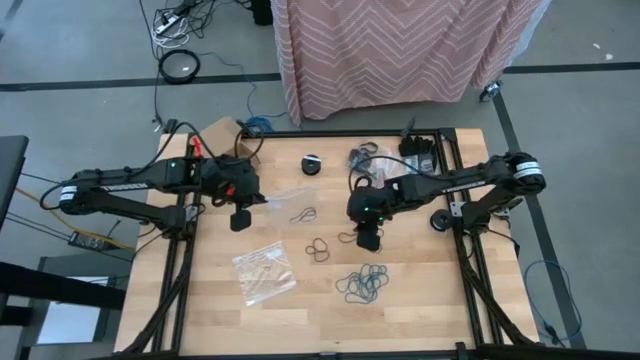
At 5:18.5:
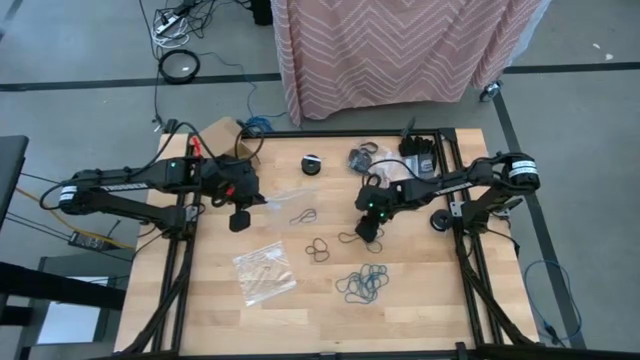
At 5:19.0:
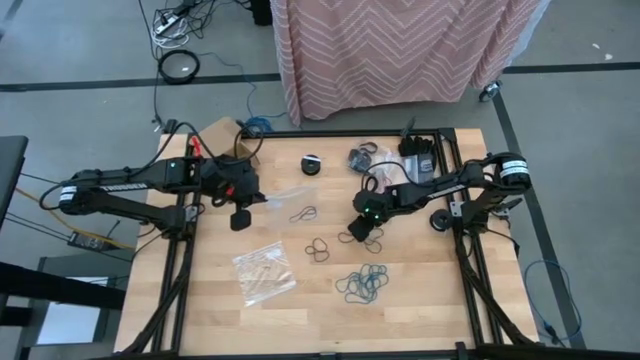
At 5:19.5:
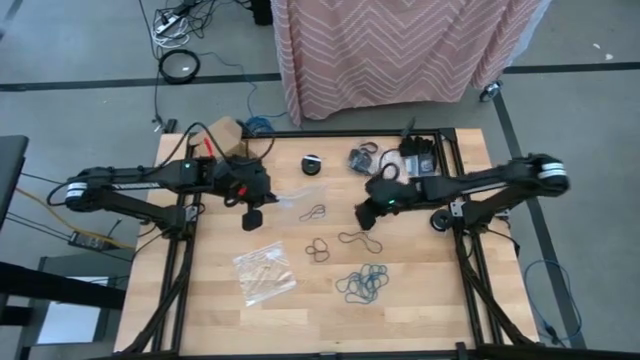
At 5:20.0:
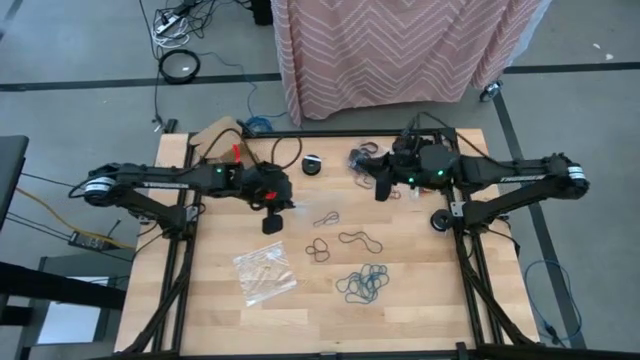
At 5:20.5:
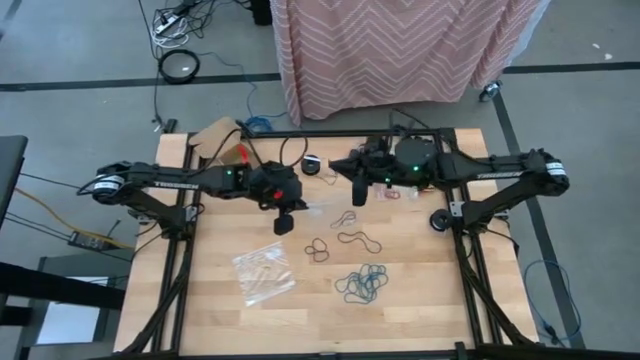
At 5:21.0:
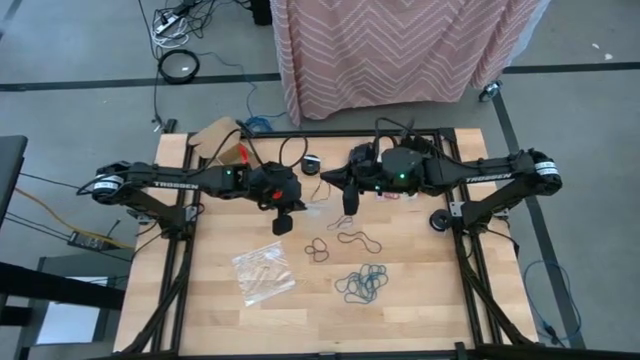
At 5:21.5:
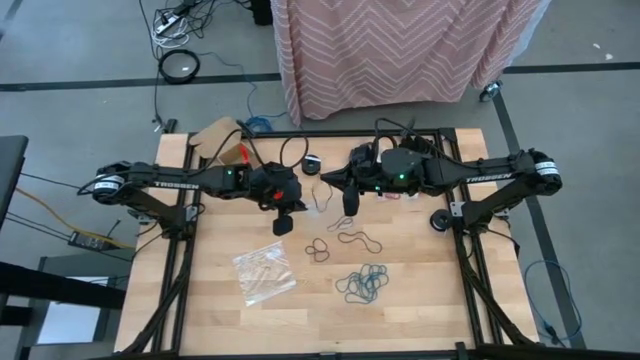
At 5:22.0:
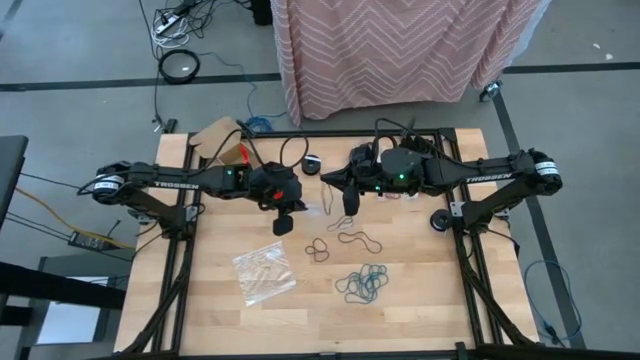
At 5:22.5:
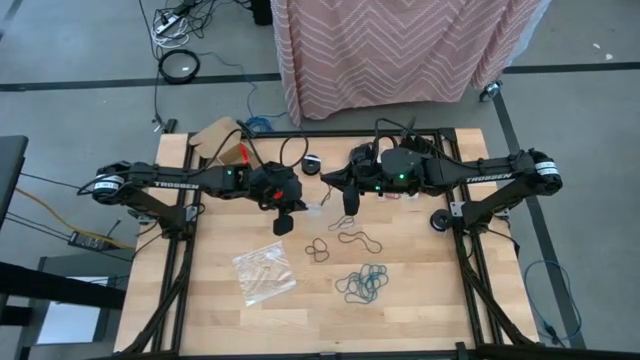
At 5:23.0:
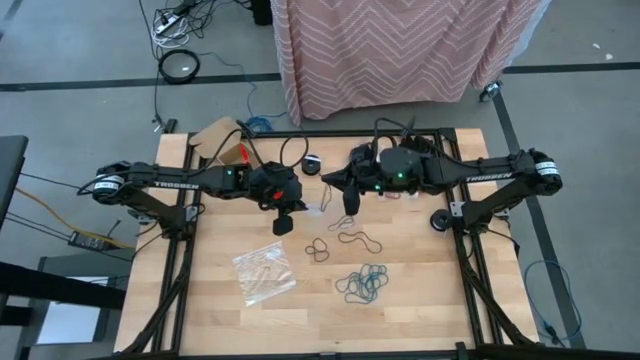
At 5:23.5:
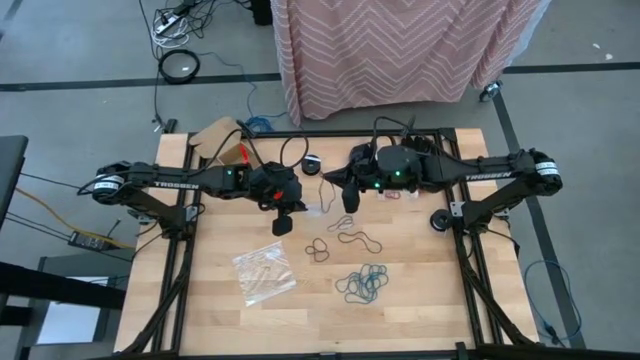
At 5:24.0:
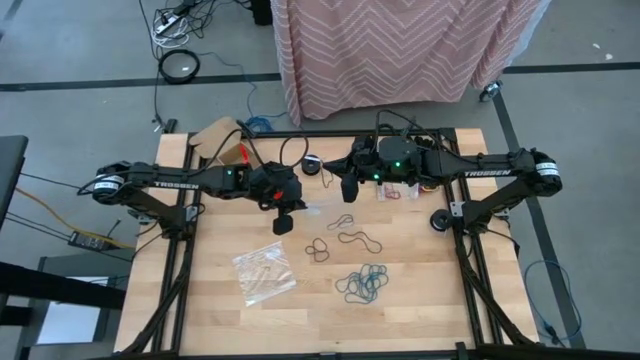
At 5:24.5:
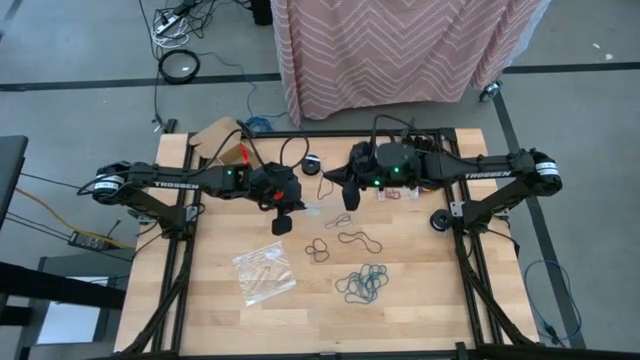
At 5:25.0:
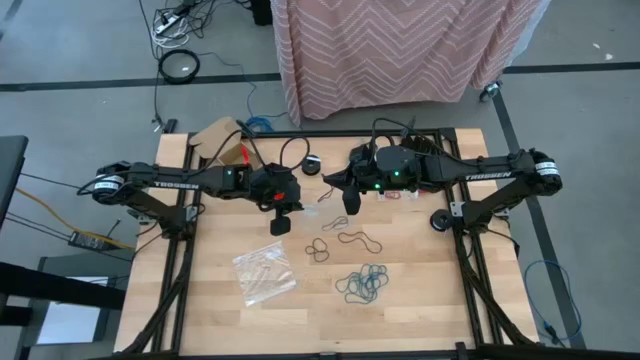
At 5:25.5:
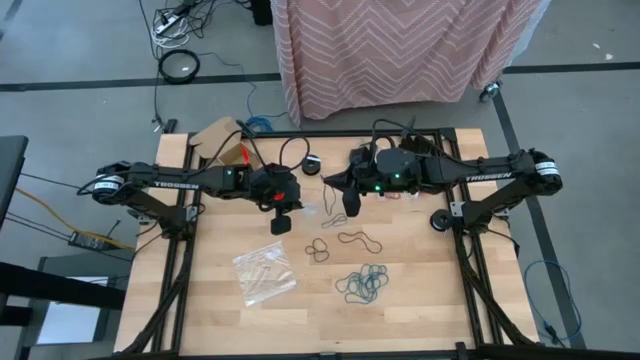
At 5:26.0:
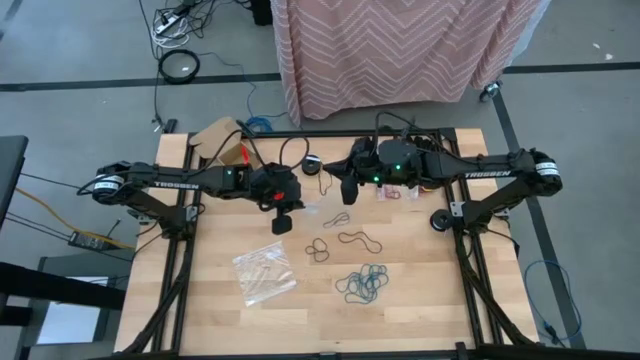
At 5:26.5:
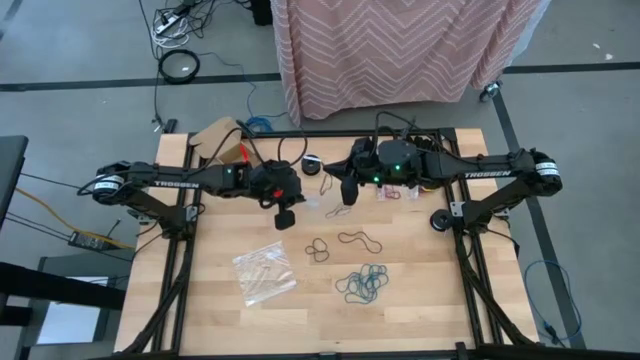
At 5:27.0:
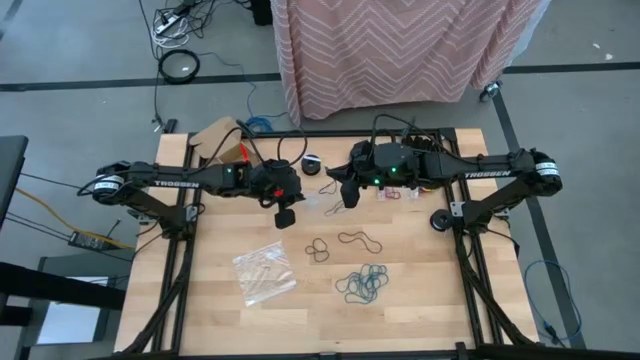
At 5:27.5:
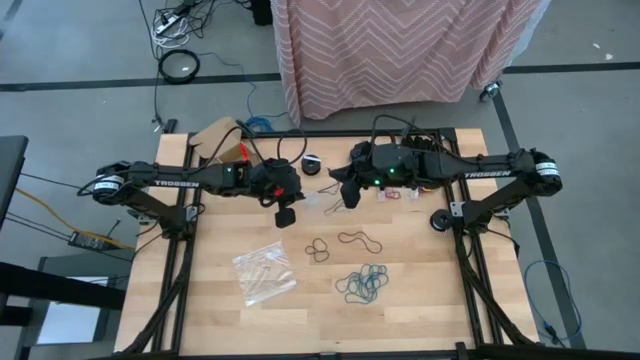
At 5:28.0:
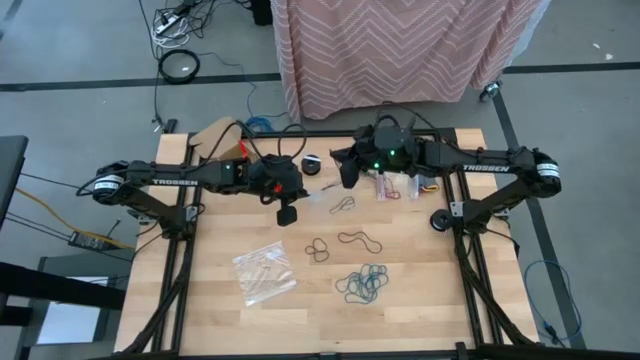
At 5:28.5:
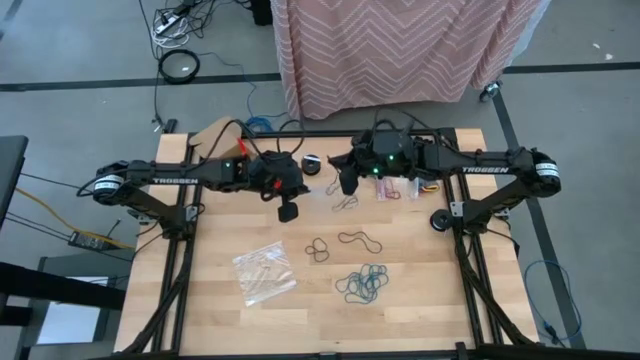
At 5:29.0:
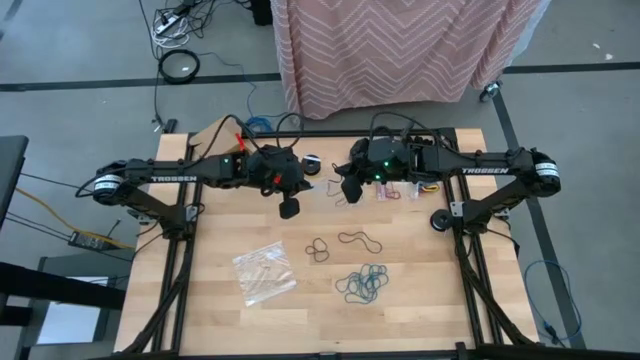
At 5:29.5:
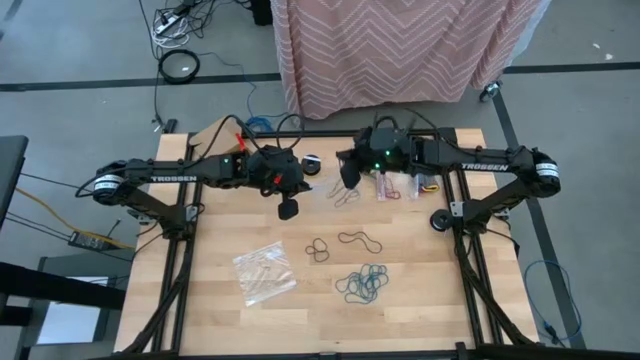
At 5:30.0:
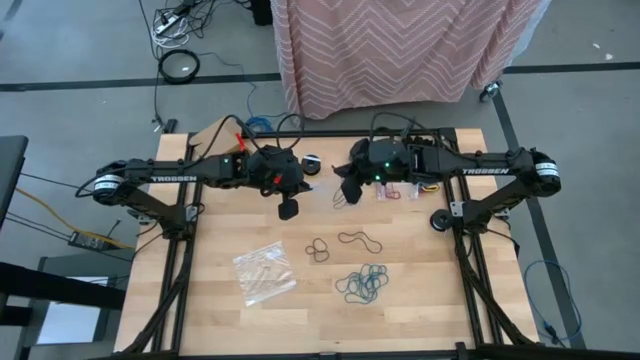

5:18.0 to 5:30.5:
Task: Sort rubber bands
Put the violet rubber band into the transparent bag

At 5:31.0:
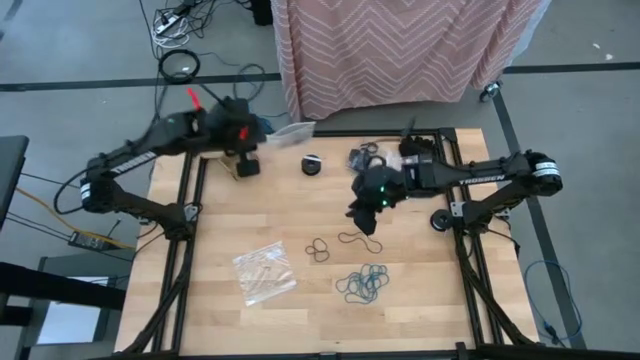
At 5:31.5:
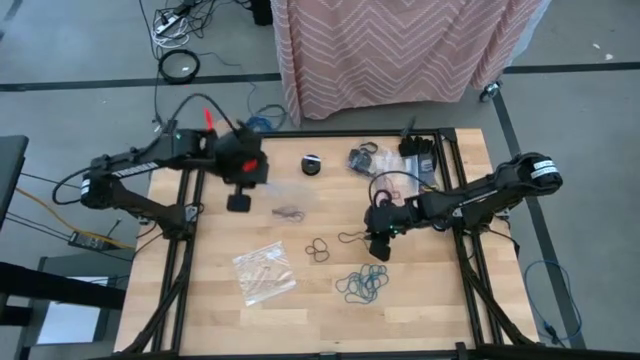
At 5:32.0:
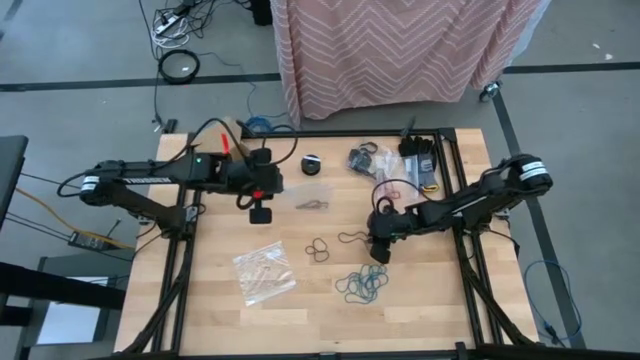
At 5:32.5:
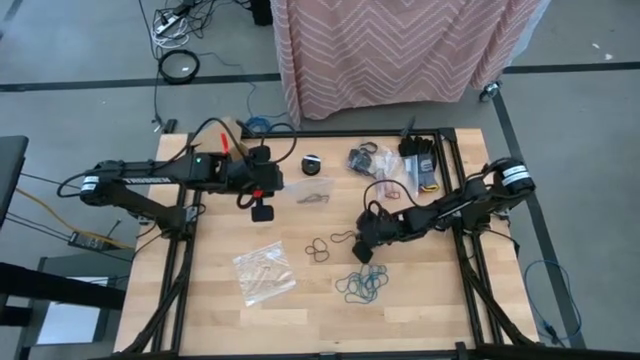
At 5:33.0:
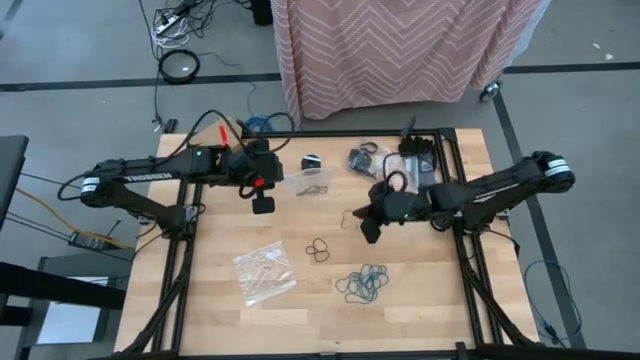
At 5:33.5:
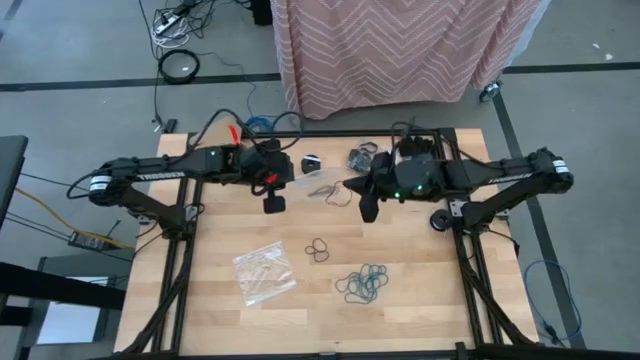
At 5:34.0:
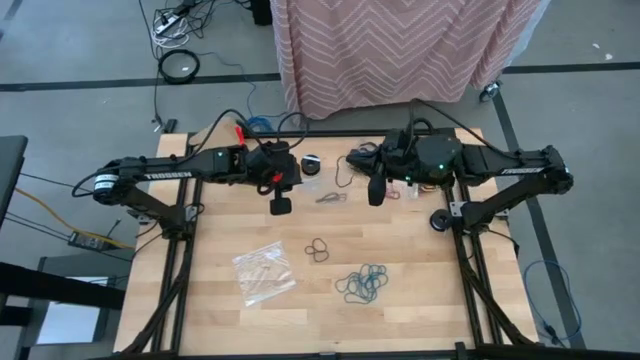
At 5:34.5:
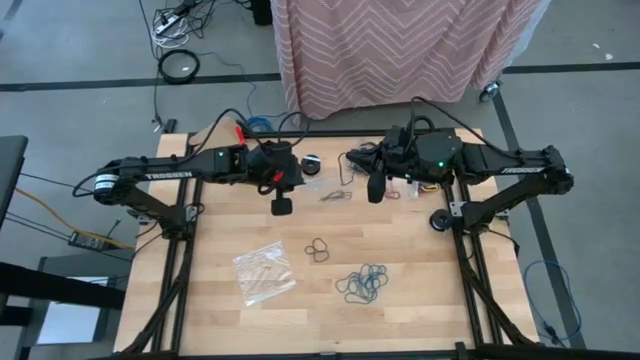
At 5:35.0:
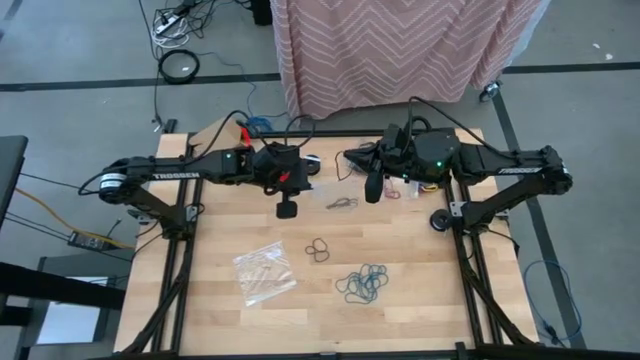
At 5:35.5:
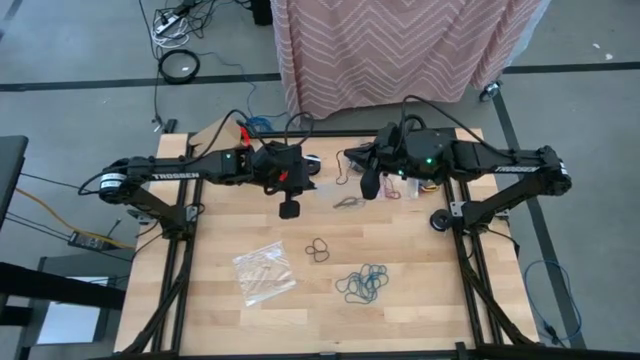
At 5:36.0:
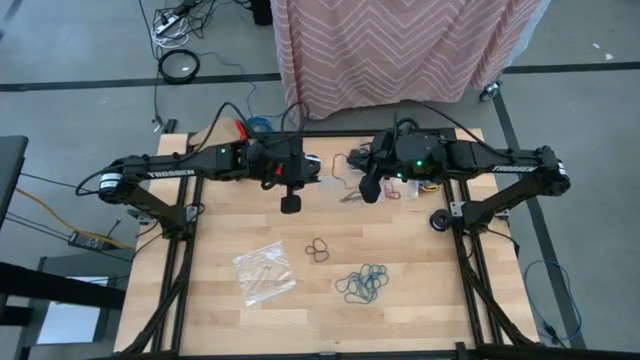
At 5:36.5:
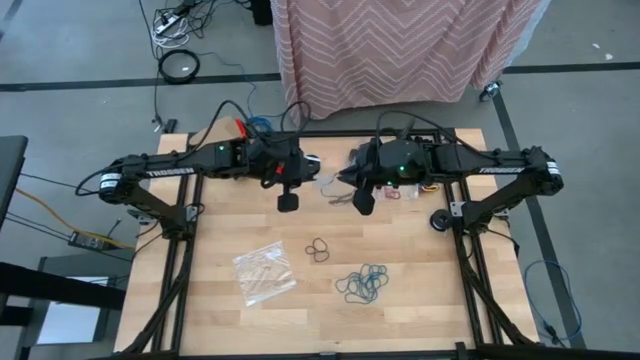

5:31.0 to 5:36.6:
Put the violet rubber band into the transparent bag

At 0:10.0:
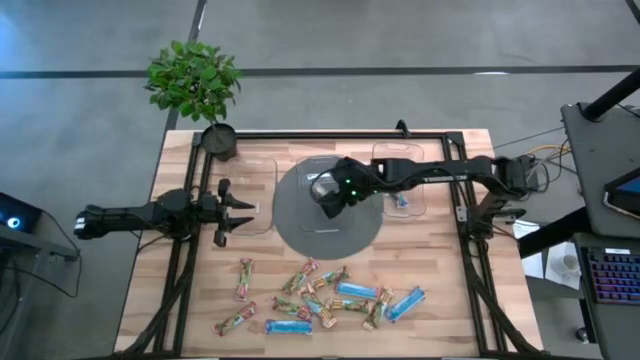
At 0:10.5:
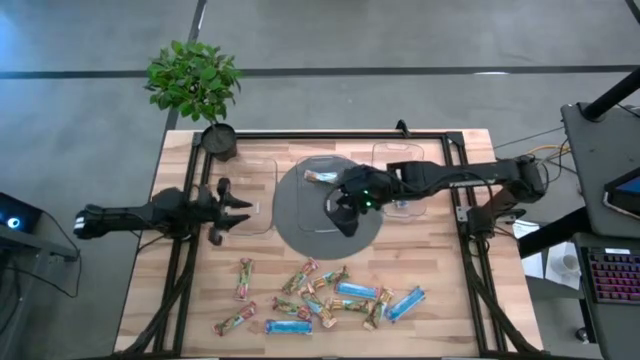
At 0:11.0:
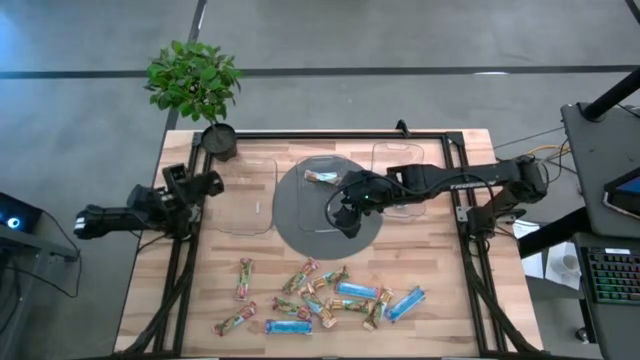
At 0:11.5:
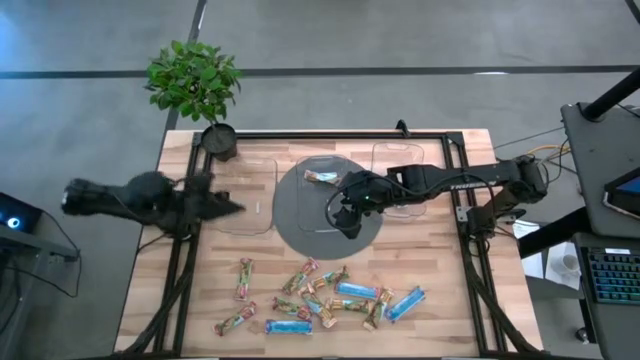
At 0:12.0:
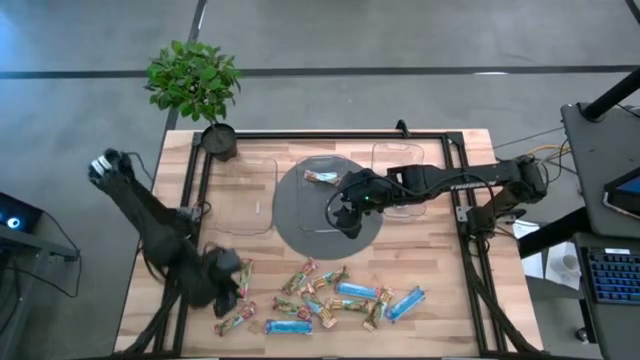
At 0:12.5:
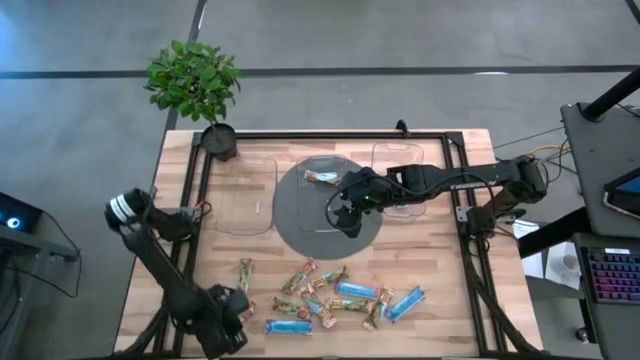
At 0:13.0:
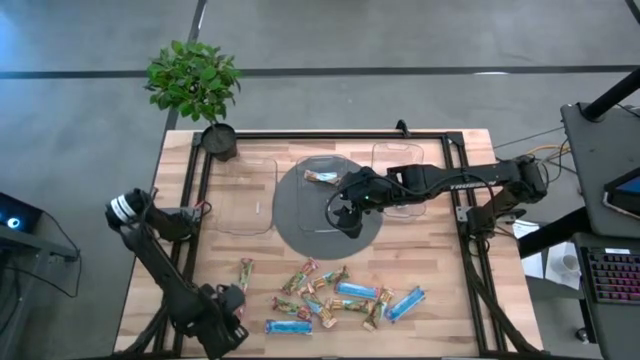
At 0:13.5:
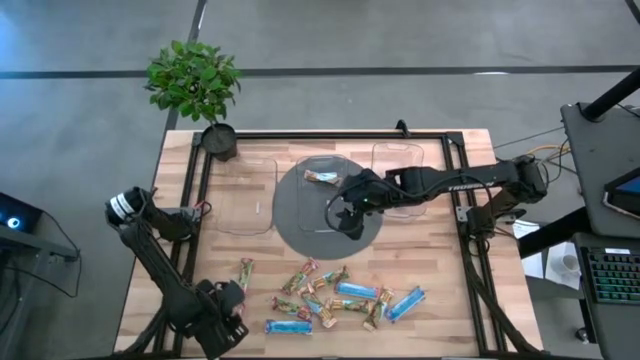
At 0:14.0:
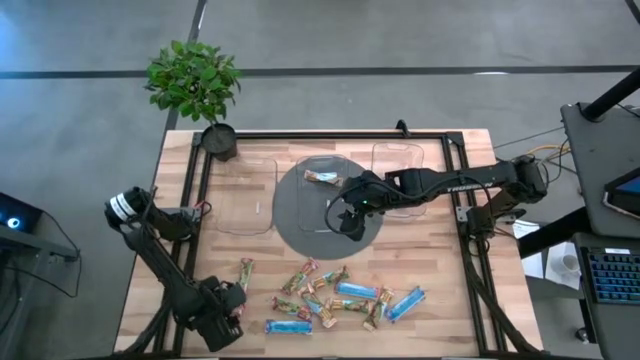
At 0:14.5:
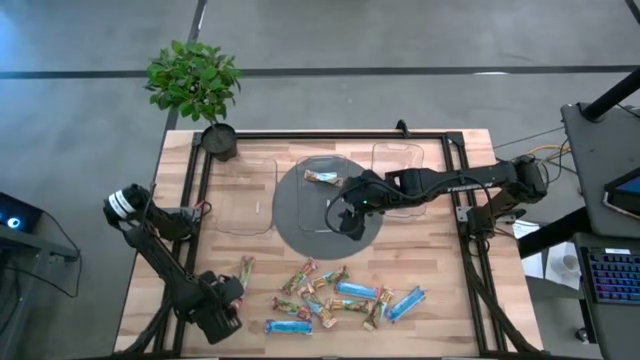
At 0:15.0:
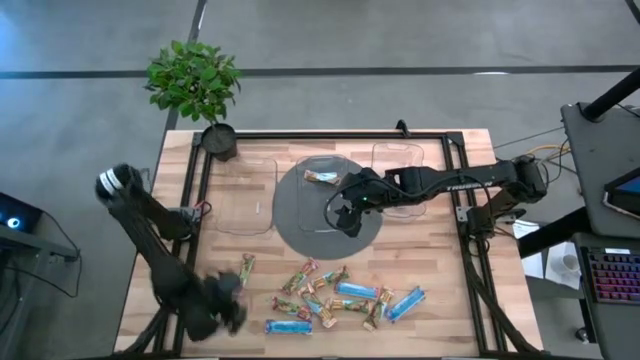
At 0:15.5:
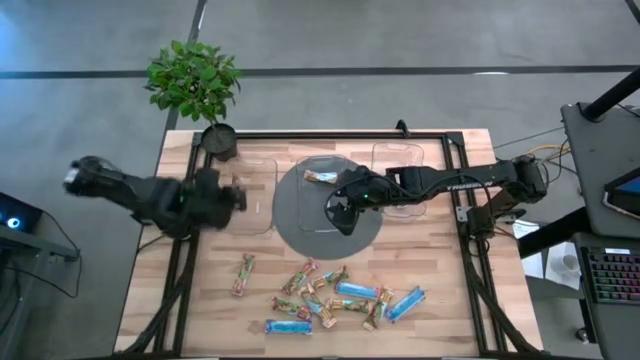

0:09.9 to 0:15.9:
Task: Pick and place Granola Bars by type
Put the red granola bar into the left transparent bin
